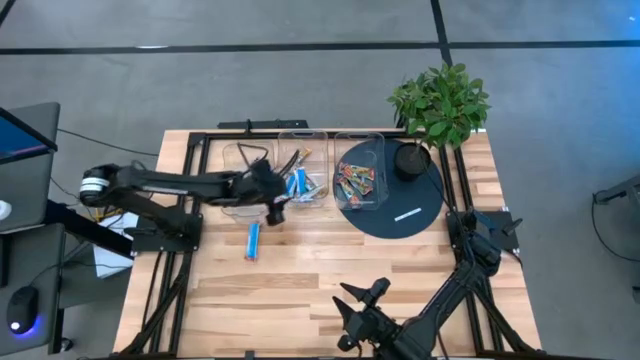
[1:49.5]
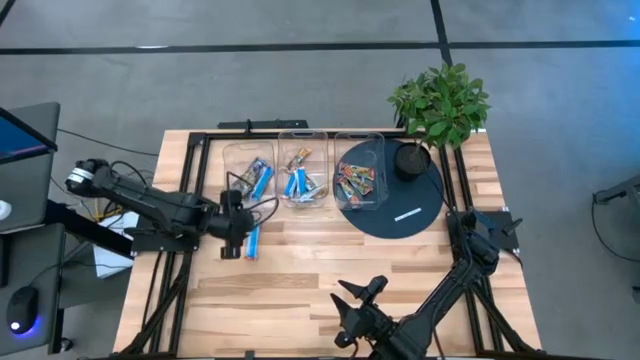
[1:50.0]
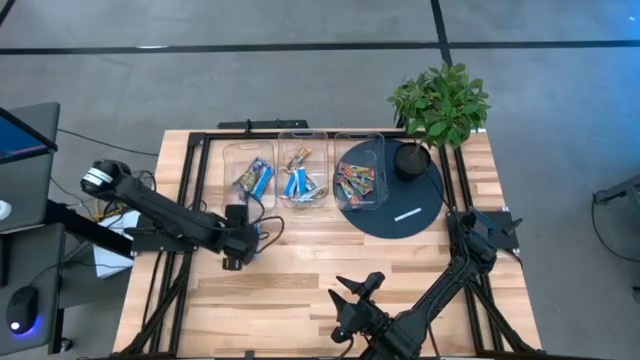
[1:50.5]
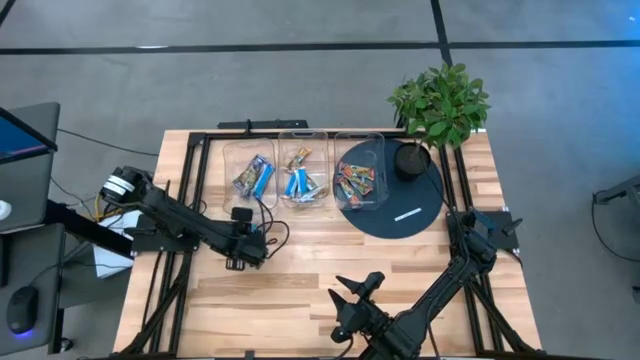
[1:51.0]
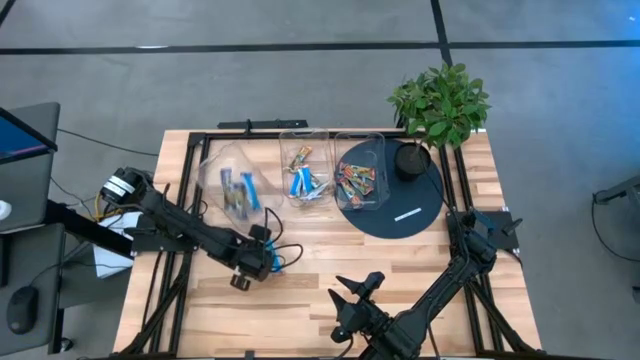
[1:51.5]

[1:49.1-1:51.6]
Task: Pick and place Granola Bars by type
Adjust the red granola bar on the table

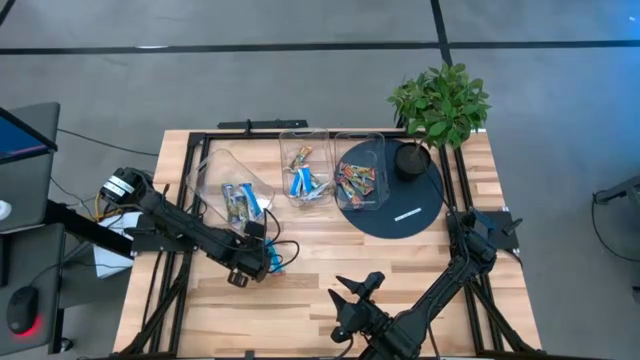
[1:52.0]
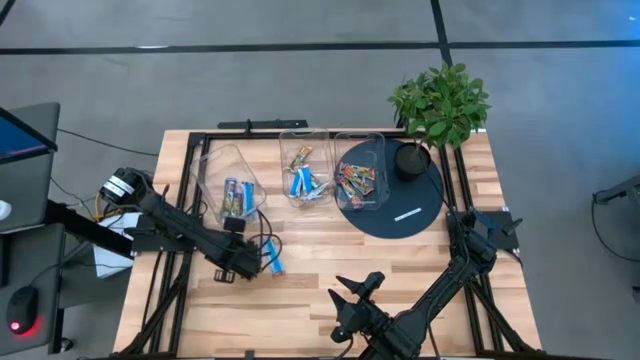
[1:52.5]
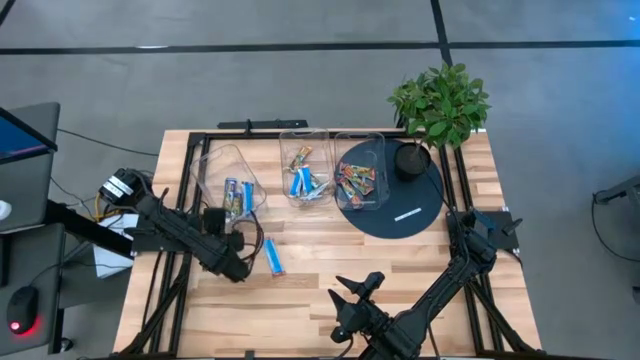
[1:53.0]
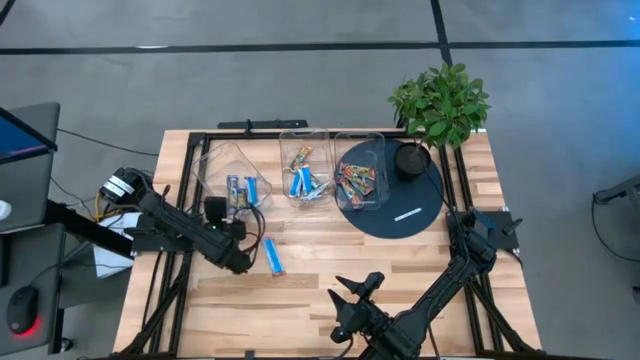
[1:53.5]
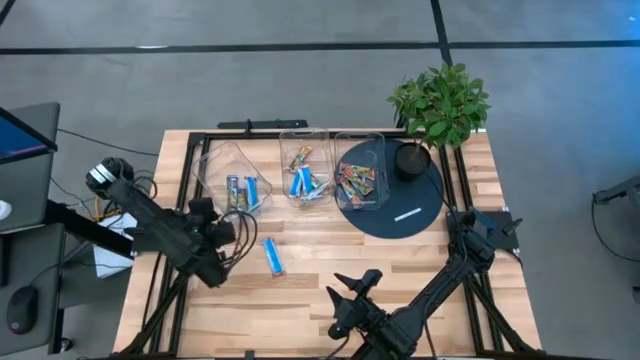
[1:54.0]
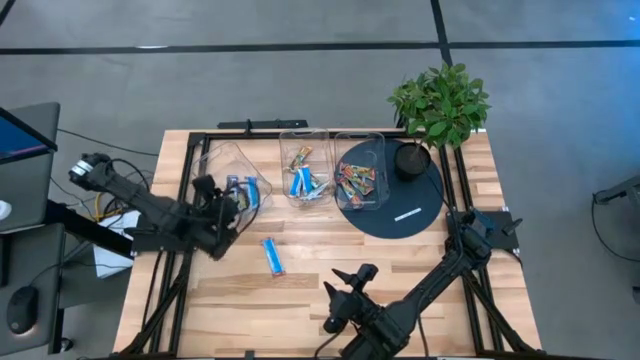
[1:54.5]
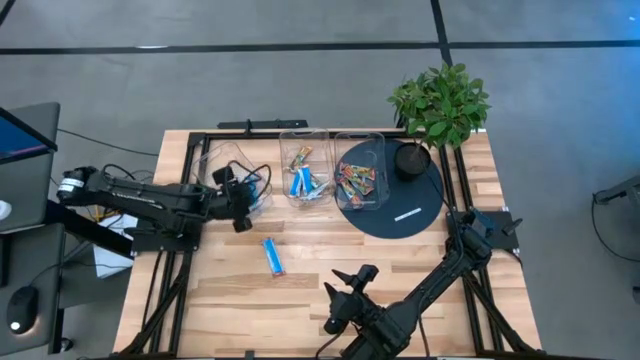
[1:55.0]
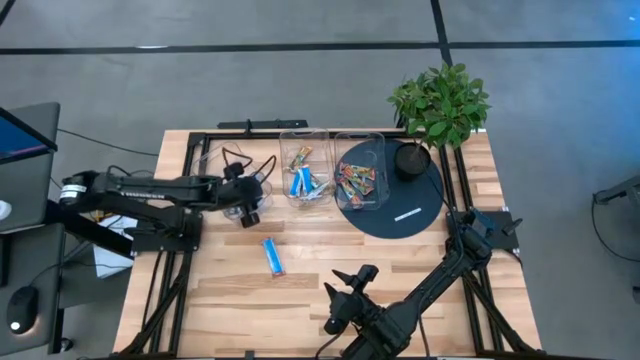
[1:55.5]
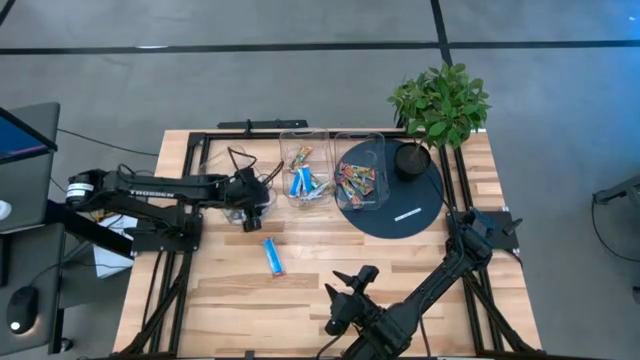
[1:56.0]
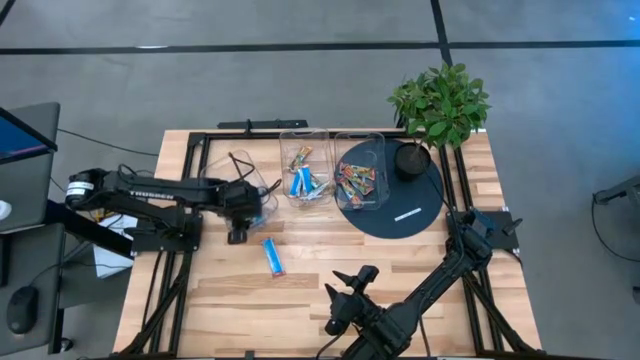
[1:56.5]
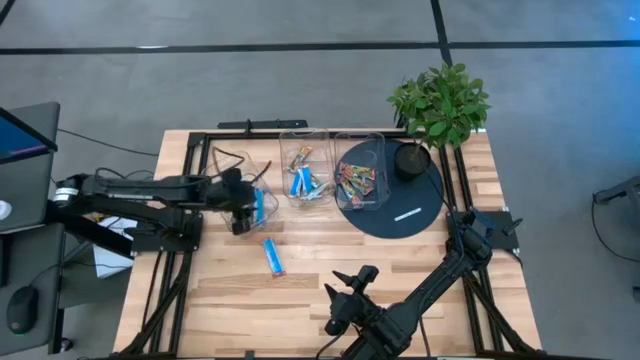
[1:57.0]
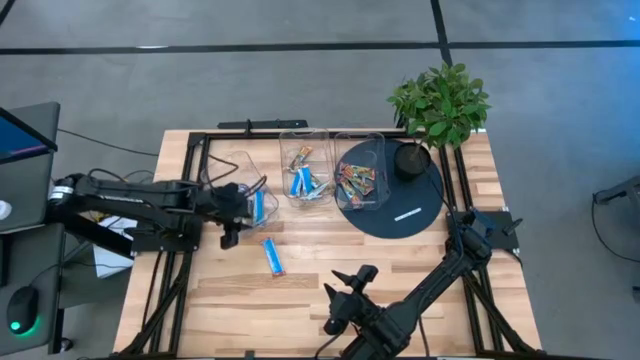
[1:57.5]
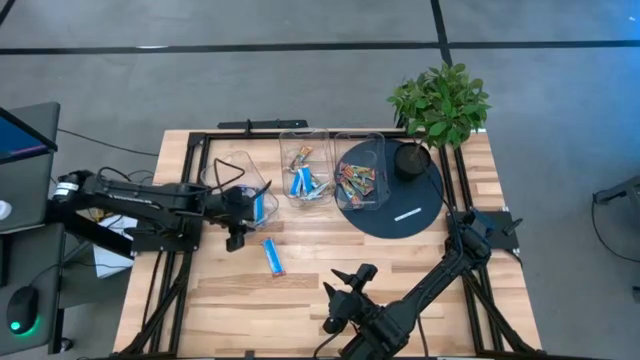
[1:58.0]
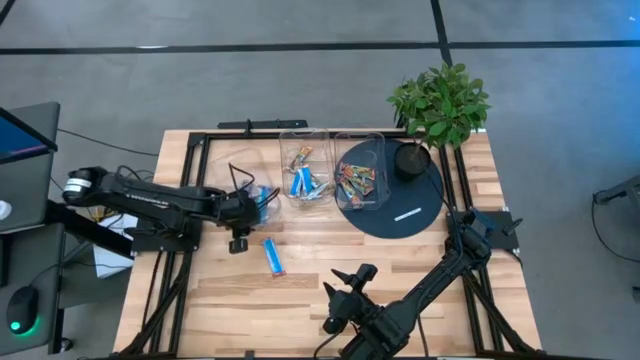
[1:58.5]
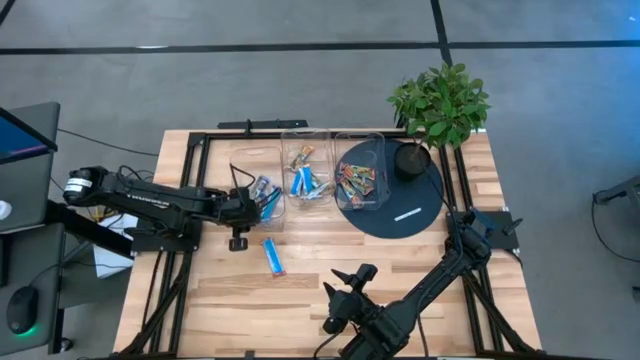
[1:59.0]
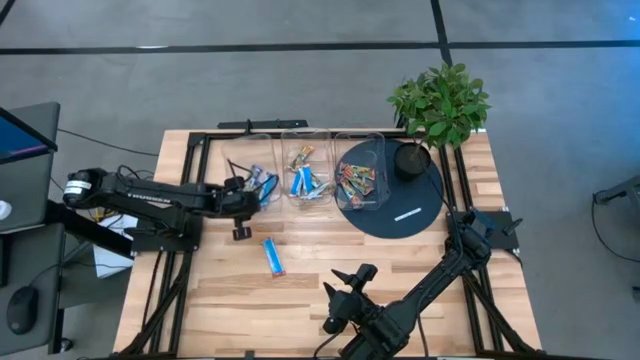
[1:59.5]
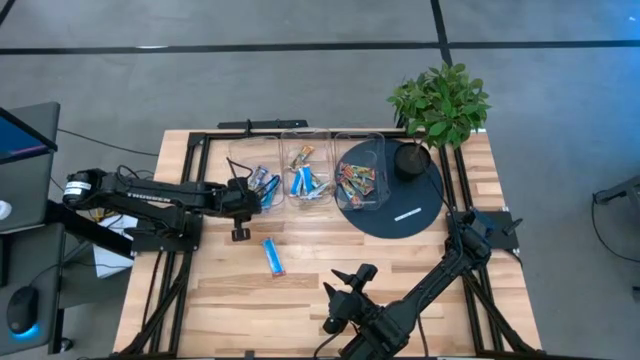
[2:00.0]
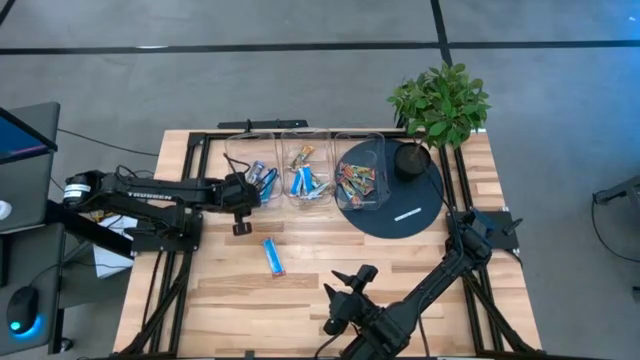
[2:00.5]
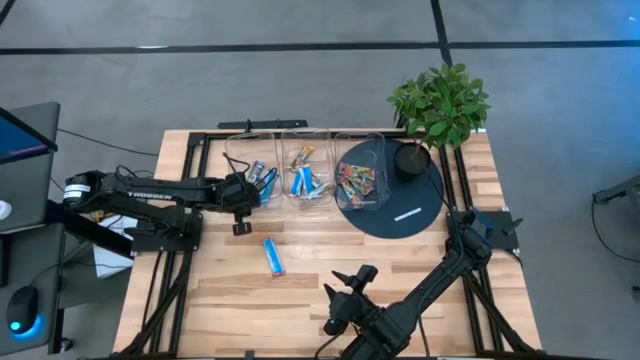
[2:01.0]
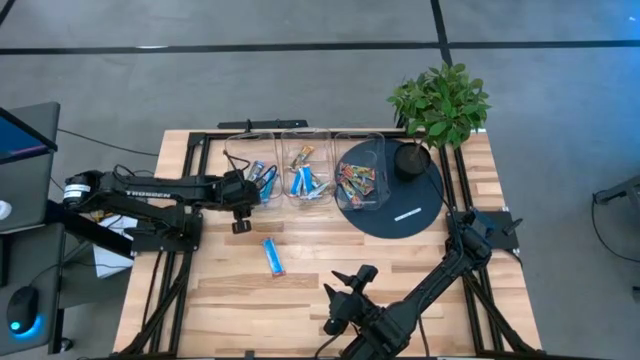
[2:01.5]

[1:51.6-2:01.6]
Adjust the left transparent bin on the table

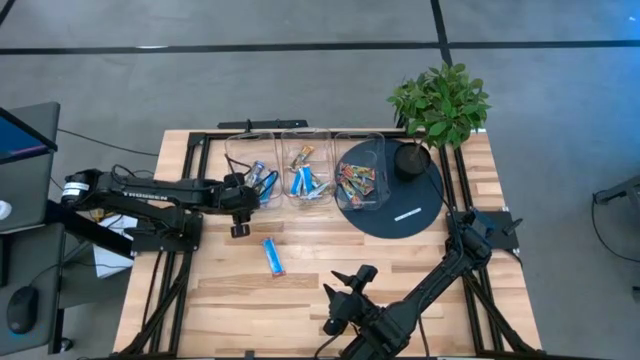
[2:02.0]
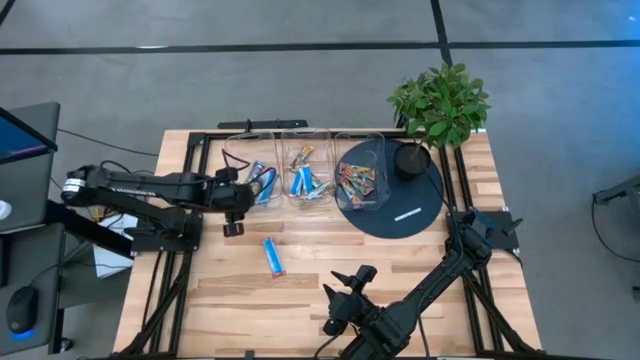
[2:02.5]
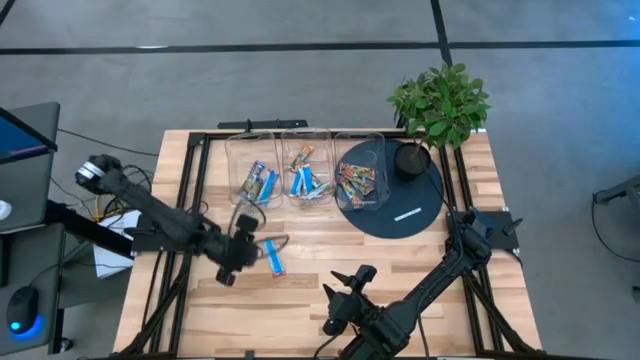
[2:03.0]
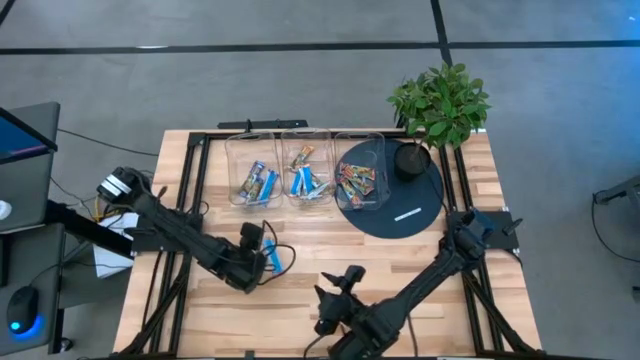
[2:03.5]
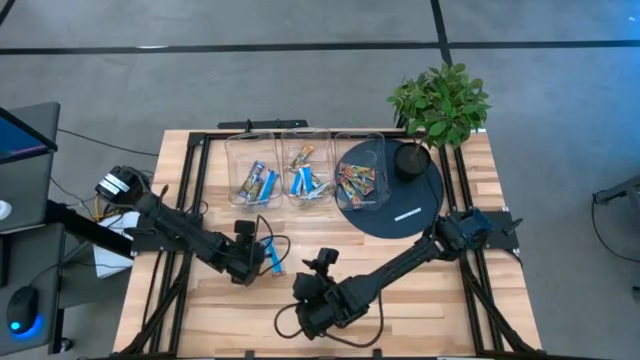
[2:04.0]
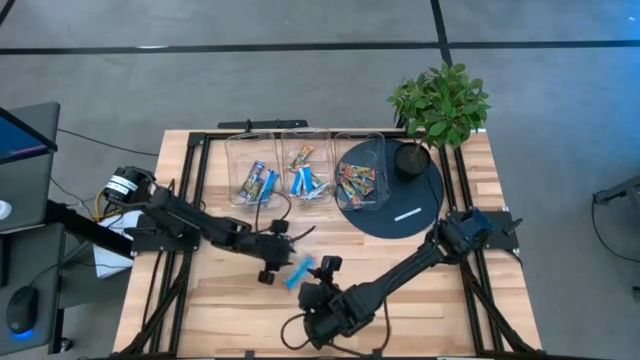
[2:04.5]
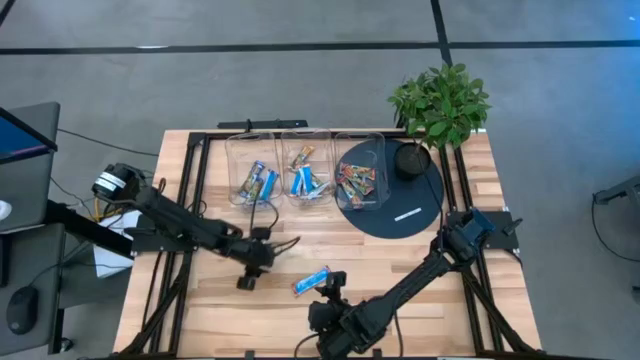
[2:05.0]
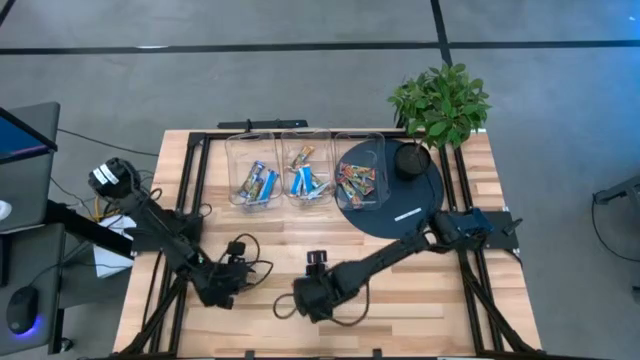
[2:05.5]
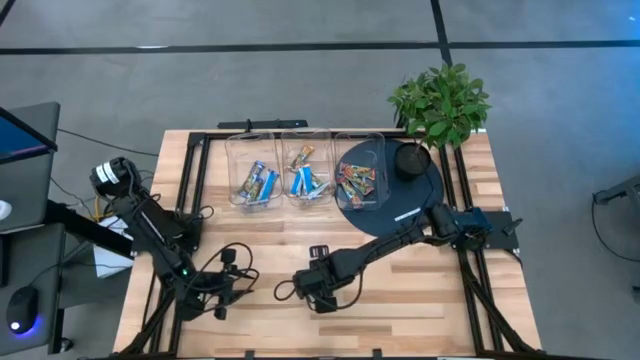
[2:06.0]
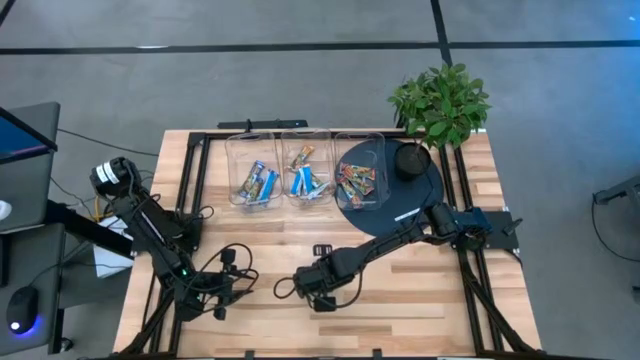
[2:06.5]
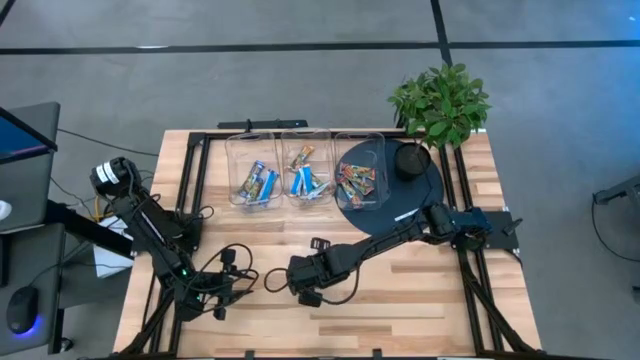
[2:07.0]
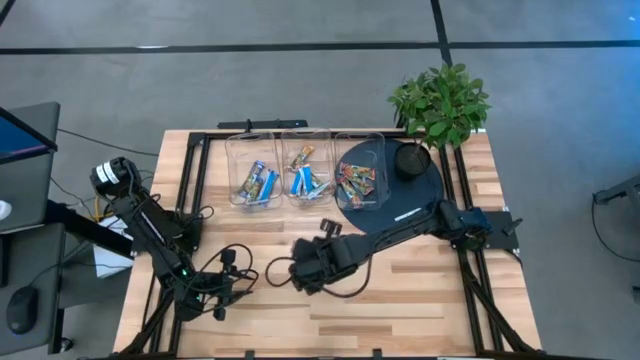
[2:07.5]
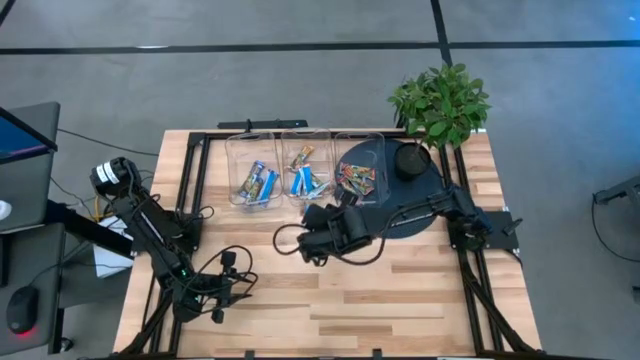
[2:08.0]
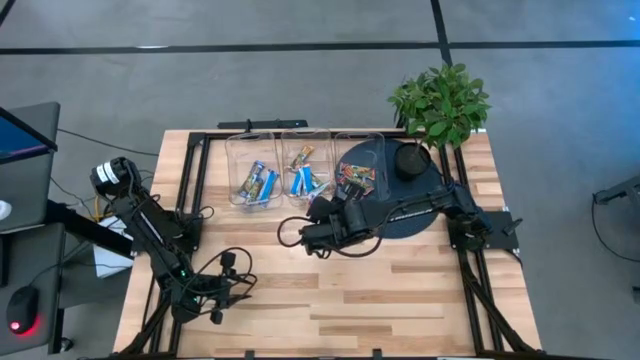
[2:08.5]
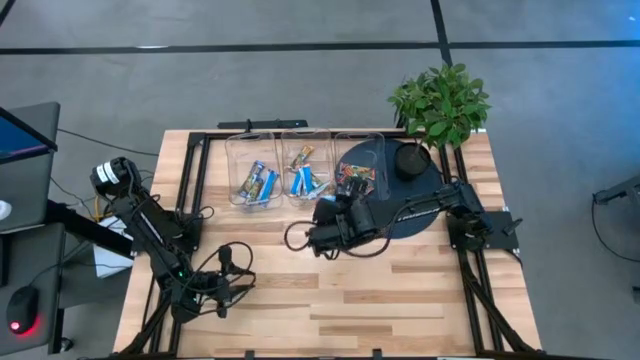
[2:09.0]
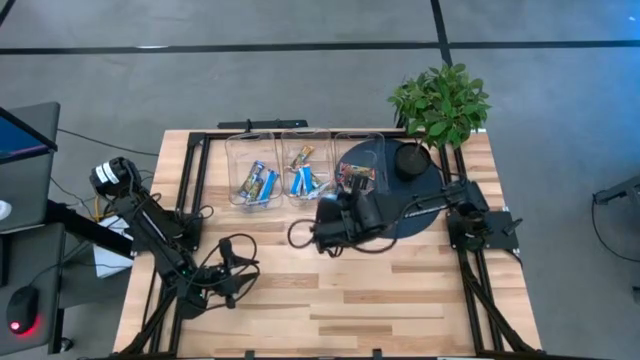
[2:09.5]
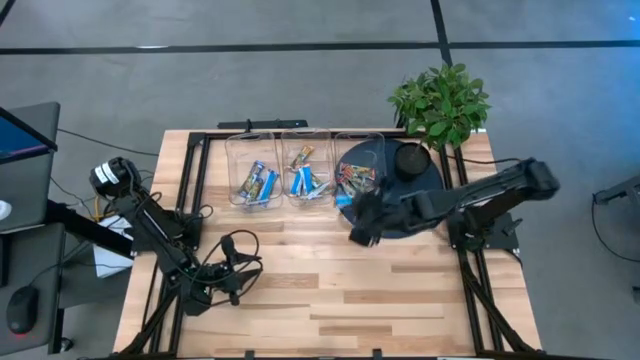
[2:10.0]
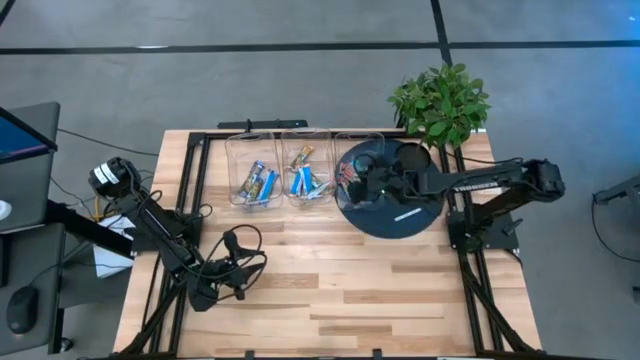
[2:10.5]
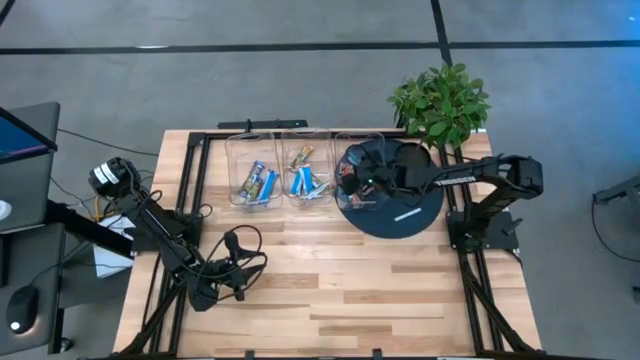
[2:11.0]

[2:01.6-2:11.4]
Put the red granola bar into the right transparent bin
